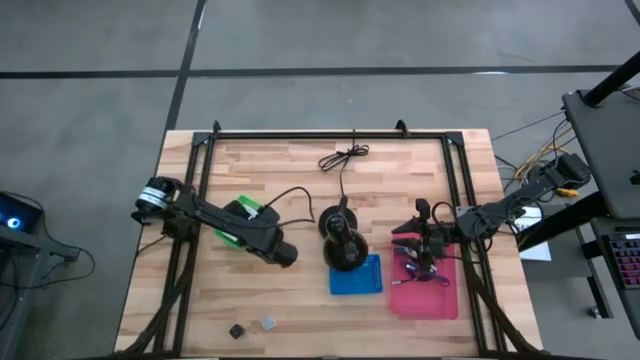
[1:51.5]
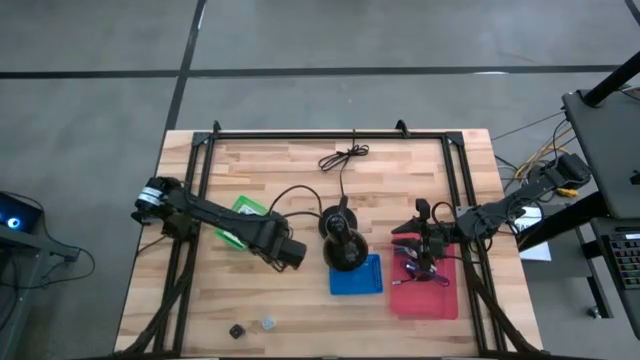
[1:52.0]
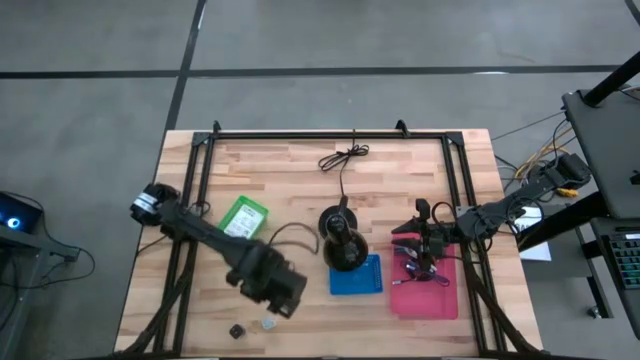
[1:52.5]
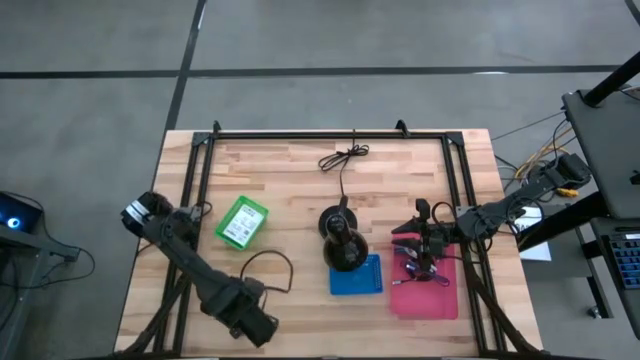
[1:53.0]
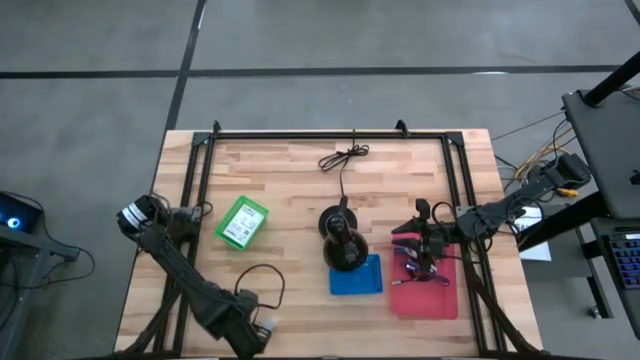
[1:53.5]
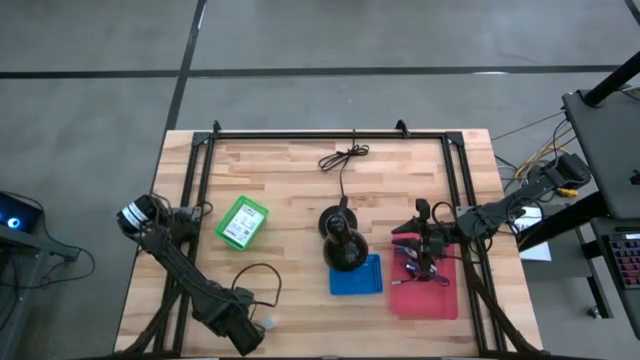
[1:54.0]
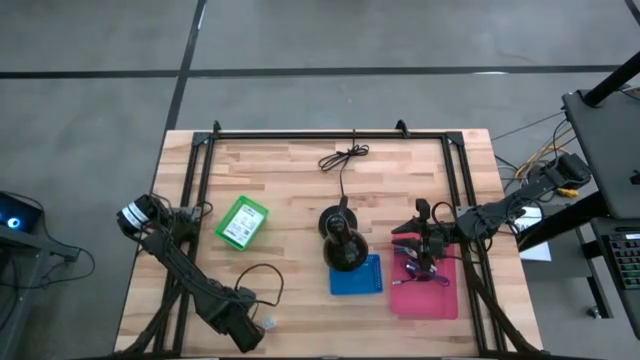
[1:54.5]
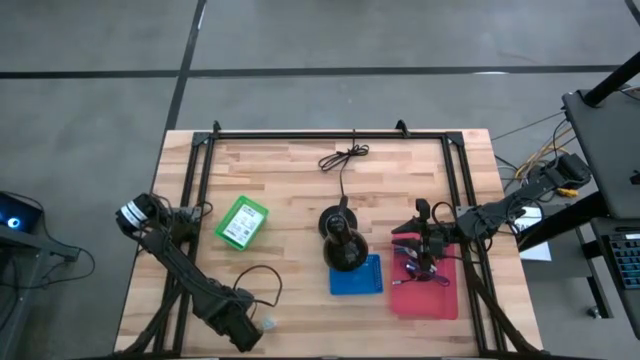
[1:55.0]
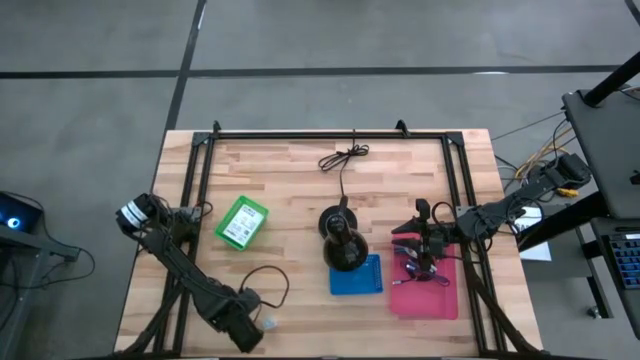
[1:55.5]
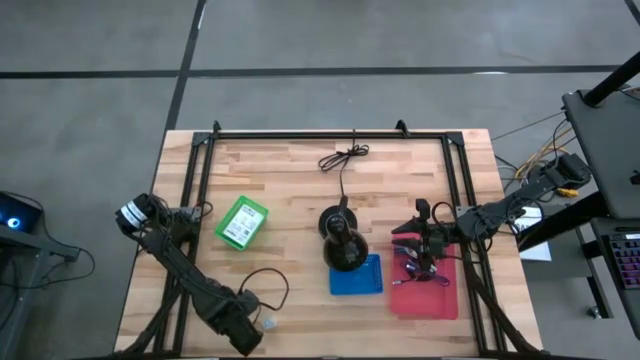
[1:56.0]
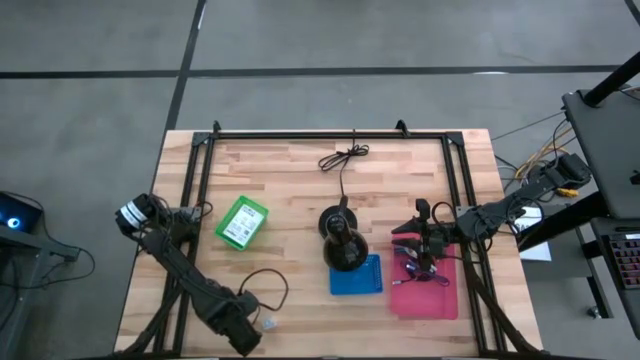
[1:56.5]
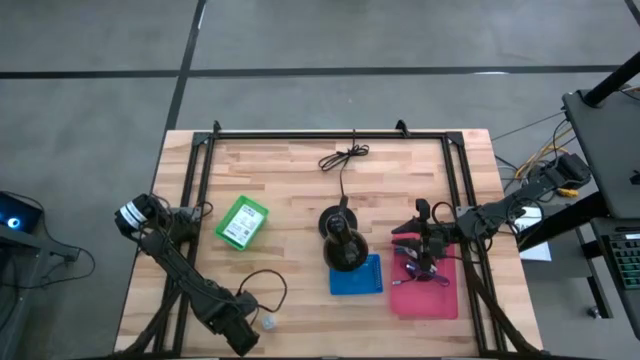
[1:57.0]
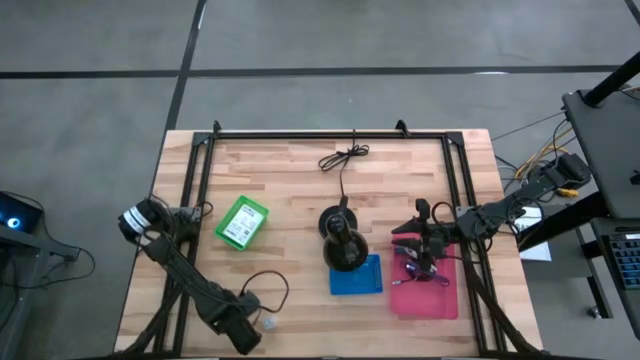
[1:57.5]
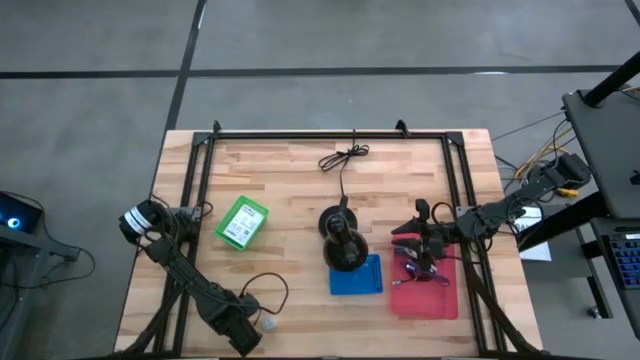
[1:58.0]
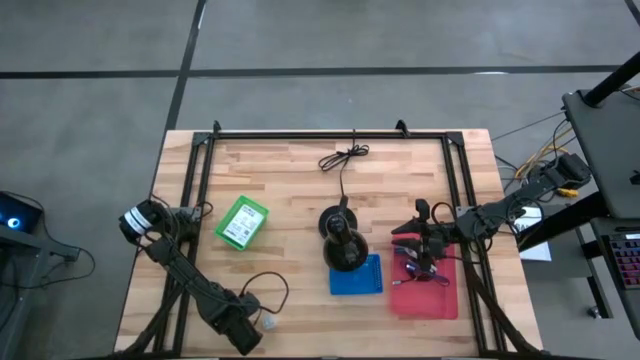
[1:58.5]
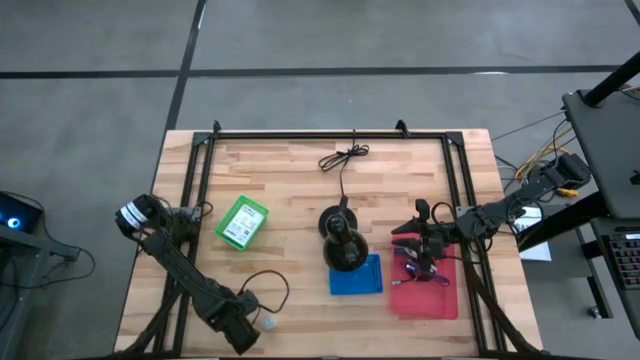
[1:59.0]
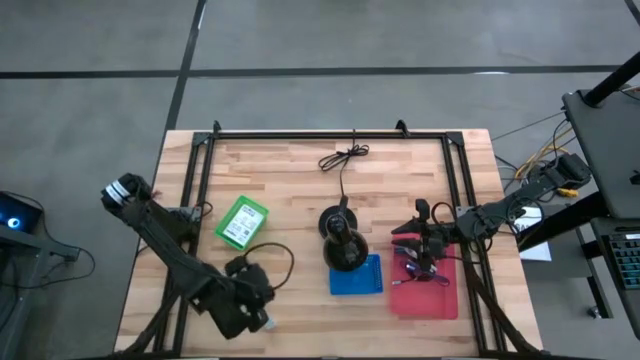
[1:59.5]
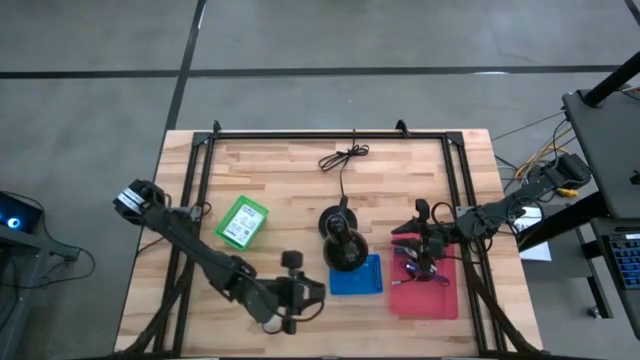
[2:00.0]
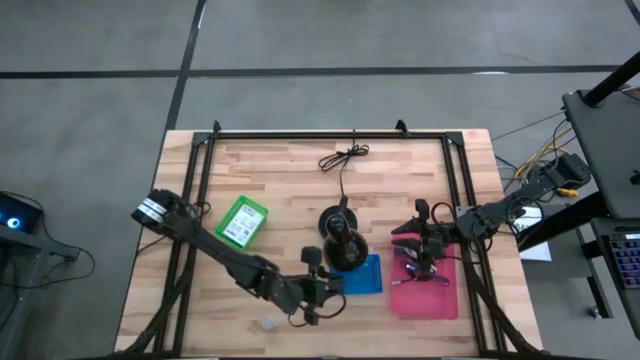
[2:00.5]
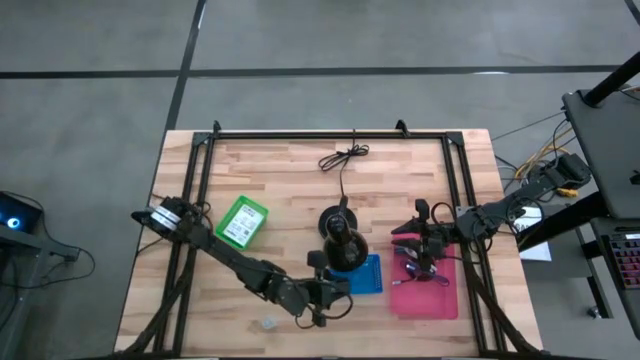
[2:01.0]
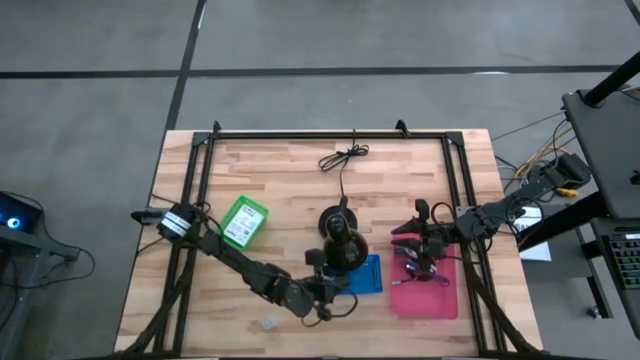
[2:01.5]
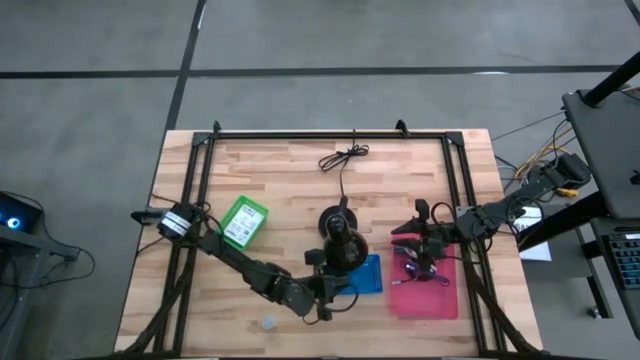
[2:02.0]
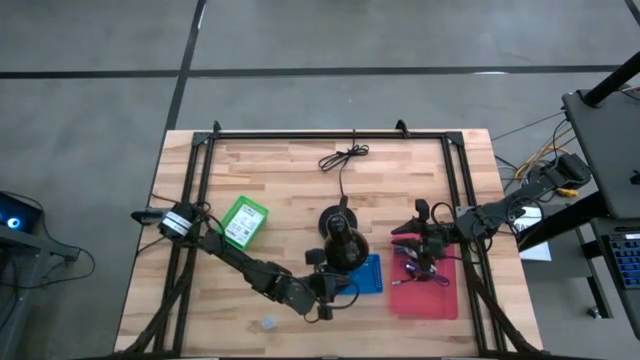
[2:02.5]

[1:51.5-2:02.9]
Task: Pick and place items into bin
Put the black charger adapter into the blue bin

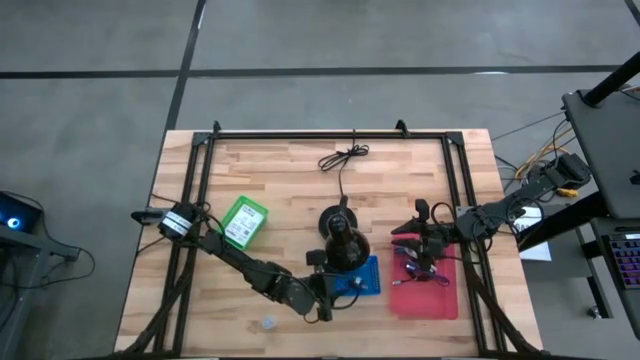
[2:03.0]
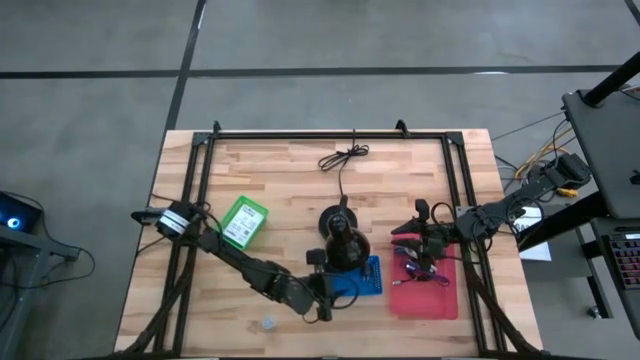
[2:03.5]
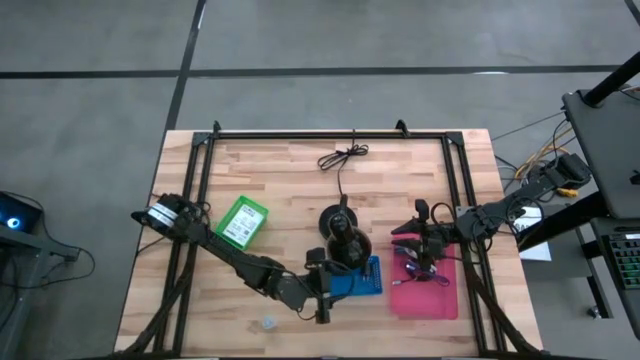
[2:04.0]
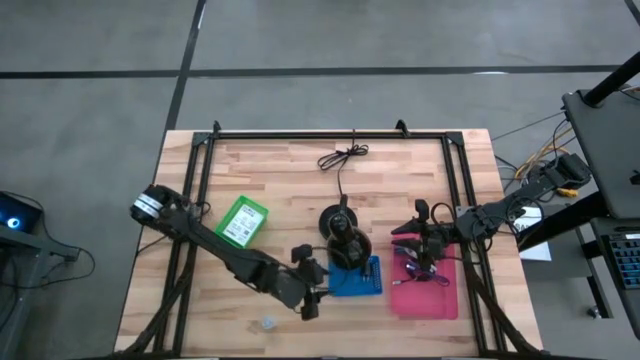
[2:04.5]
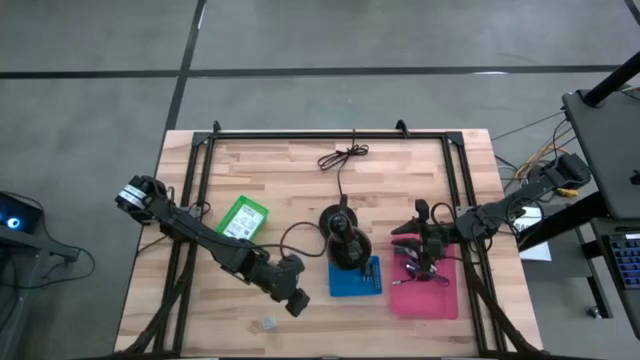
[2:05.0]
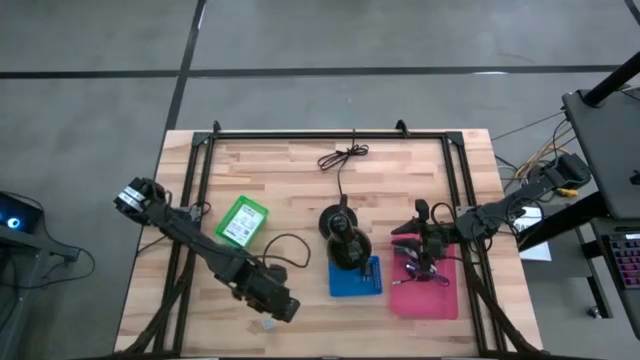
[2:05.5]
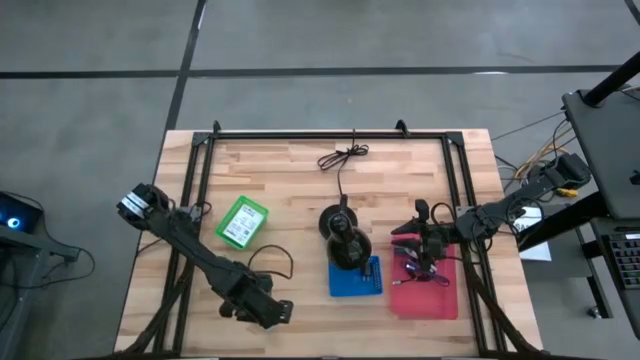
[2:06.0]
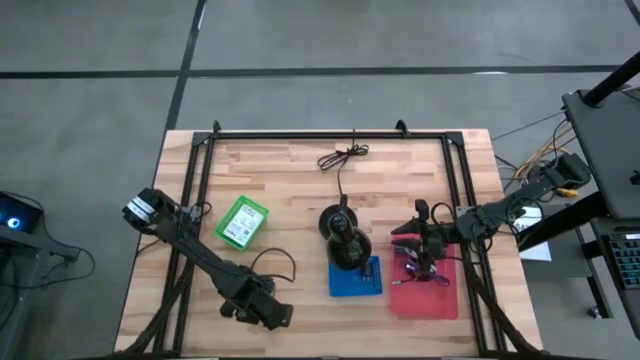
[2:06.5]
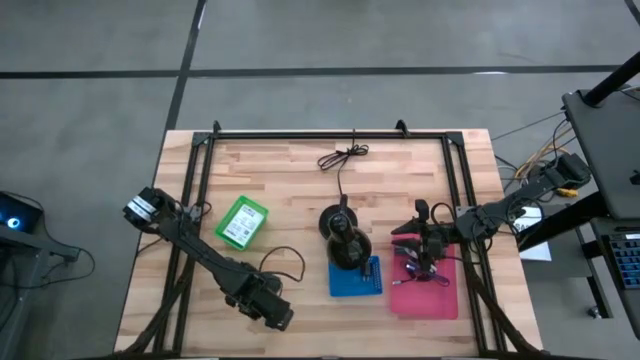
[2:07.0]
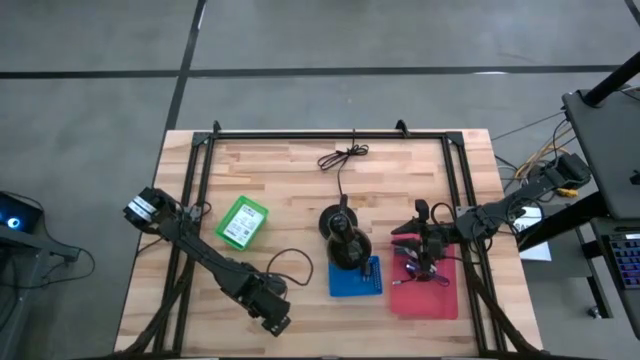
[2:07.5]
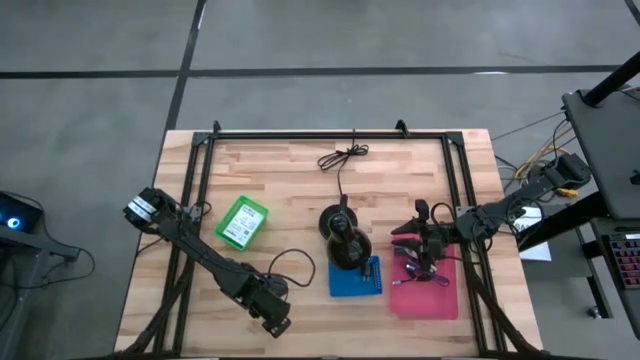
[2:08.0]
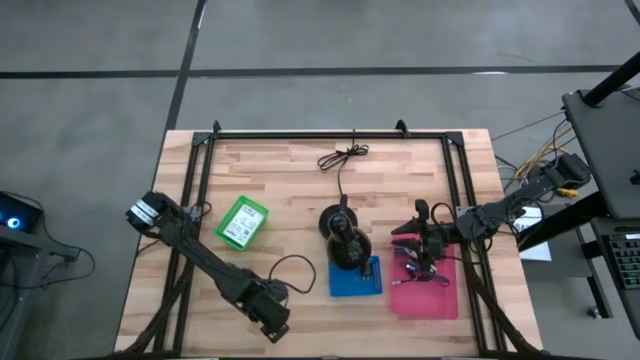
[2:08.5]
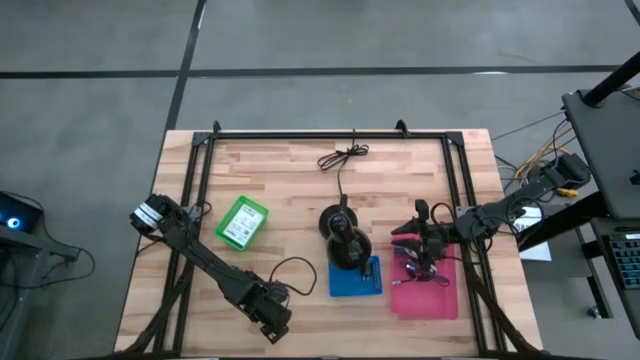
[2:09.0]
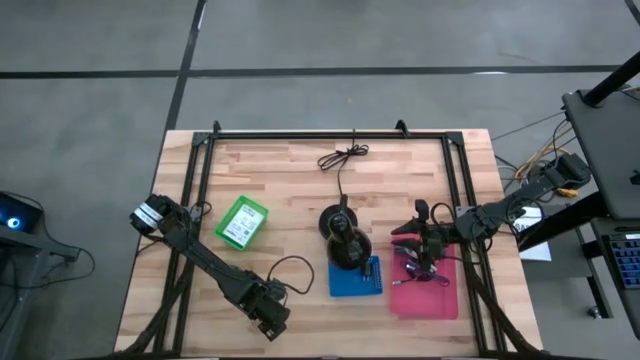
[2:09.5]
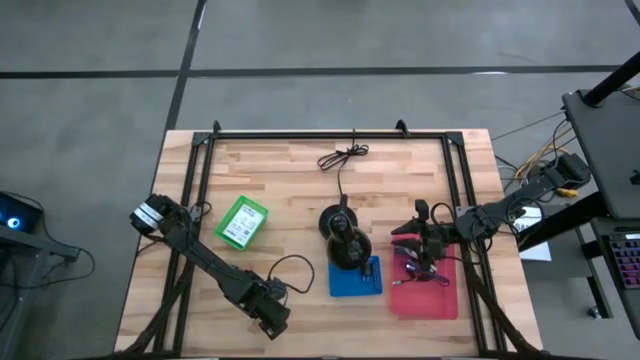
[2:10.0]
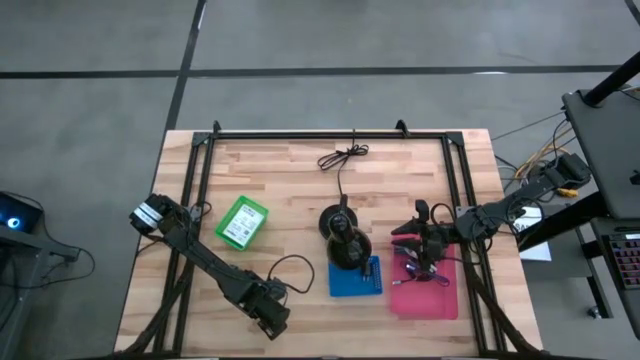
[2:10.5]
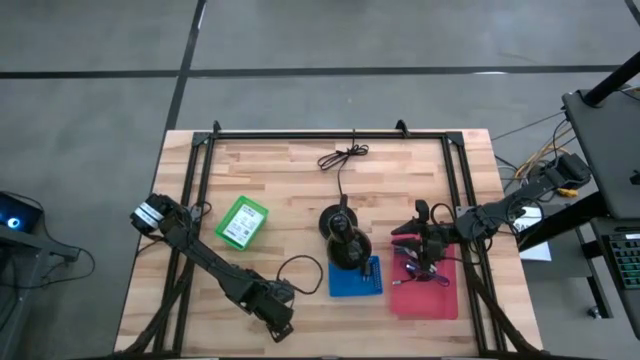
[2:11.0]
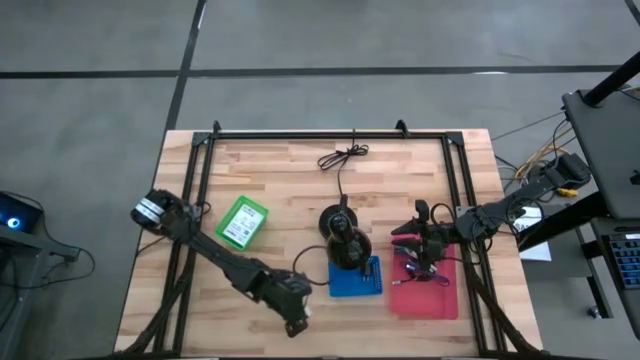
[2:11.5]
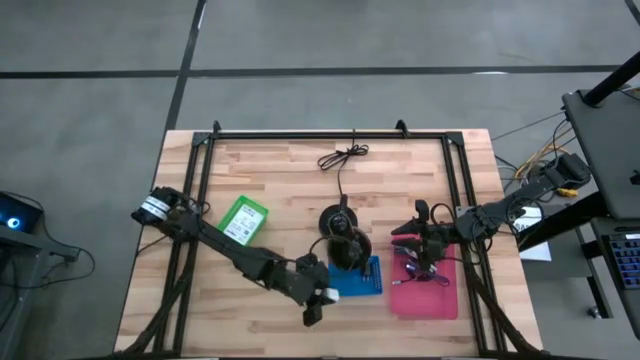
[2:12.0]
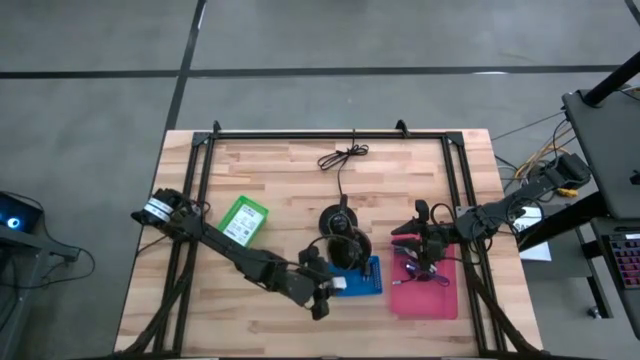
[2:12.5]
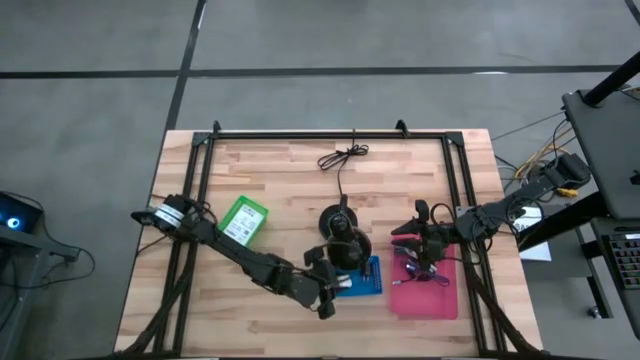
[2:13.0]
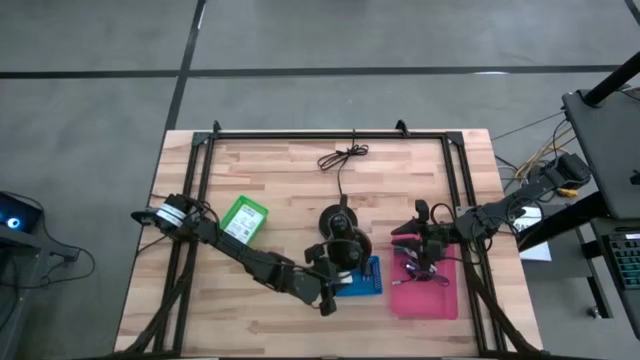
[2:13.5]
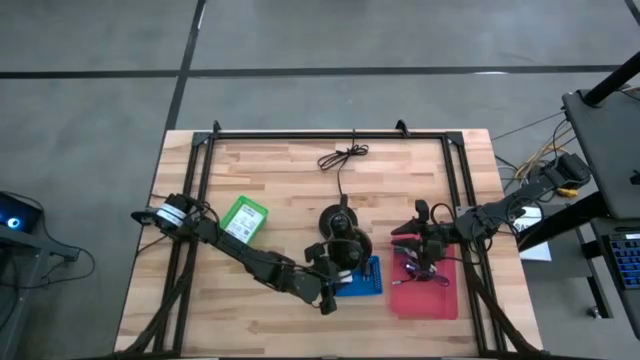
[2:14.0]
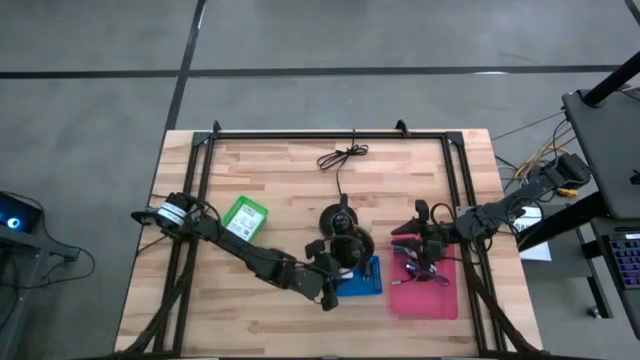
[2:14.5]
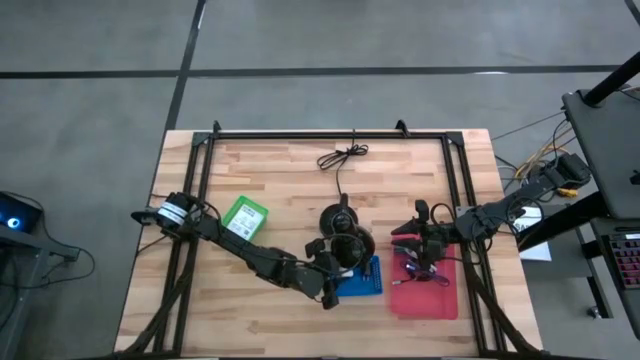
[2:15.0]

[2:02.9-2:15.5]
Put the white charger adapter into the blue bin
